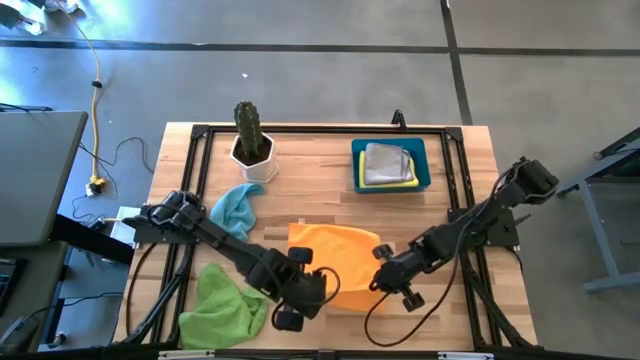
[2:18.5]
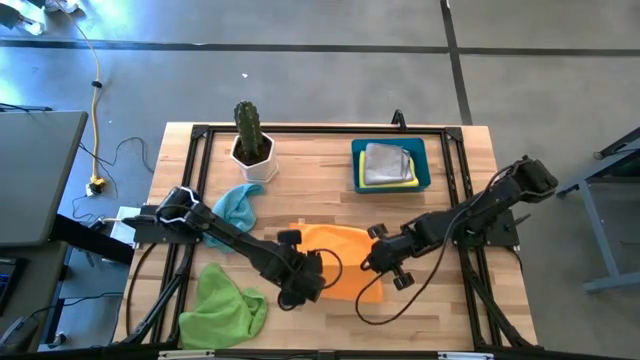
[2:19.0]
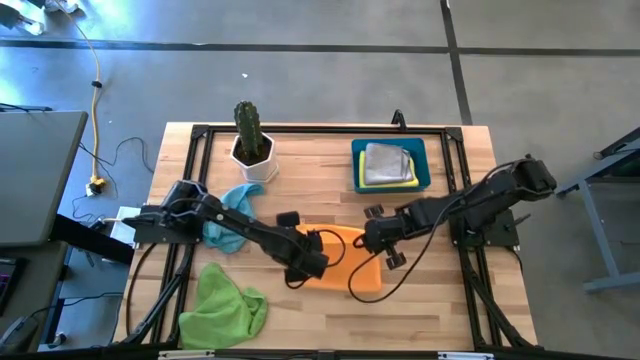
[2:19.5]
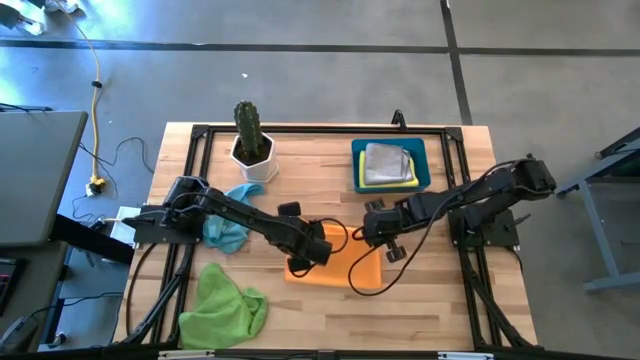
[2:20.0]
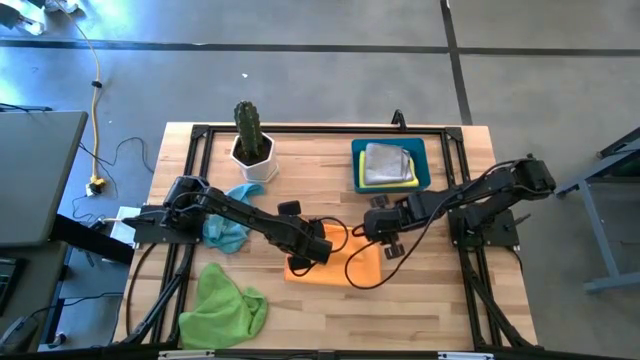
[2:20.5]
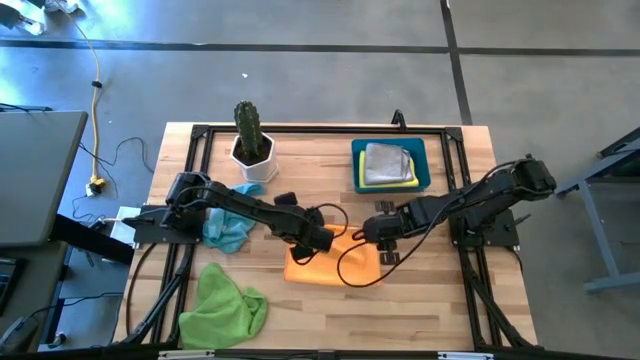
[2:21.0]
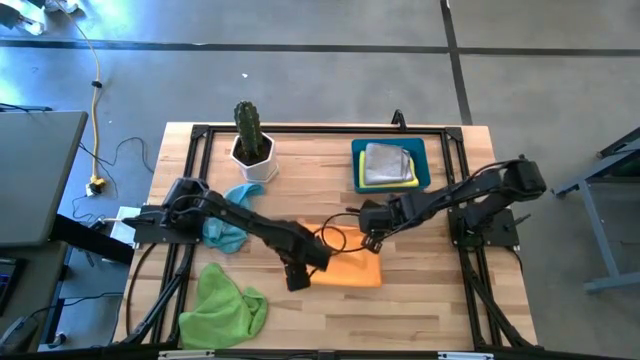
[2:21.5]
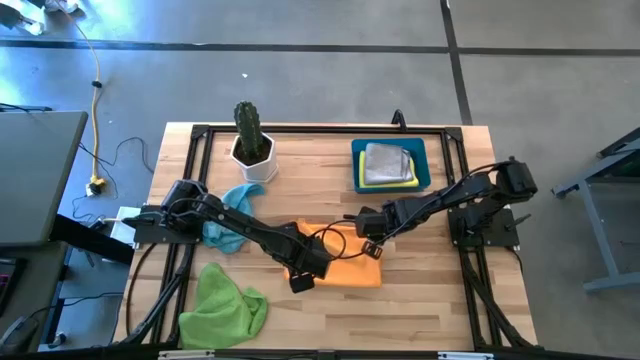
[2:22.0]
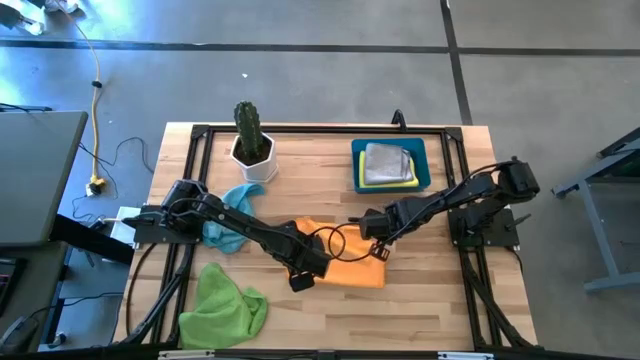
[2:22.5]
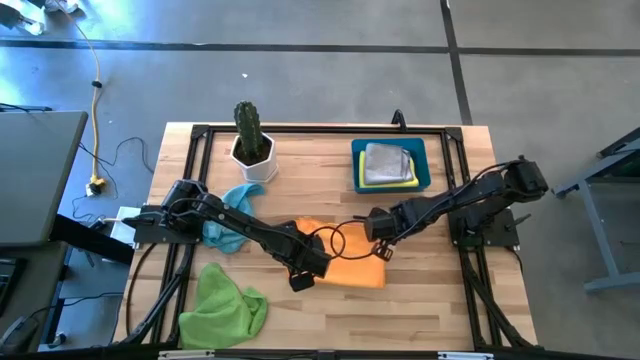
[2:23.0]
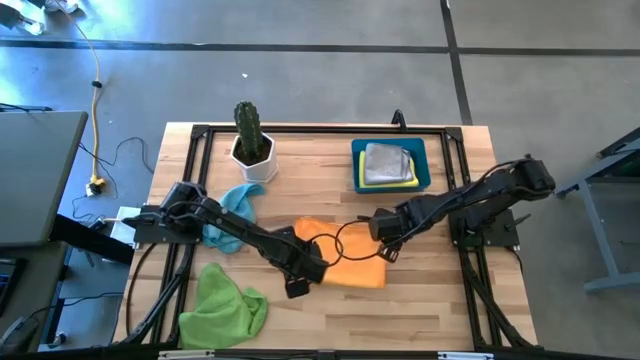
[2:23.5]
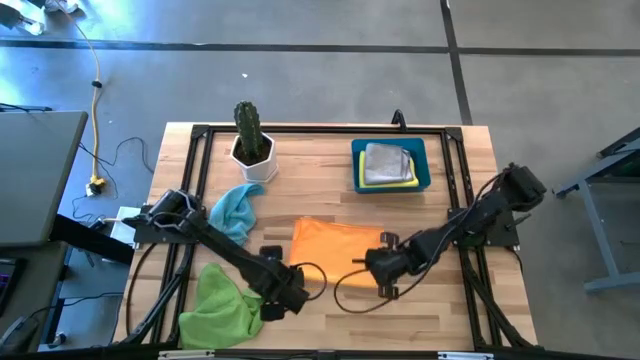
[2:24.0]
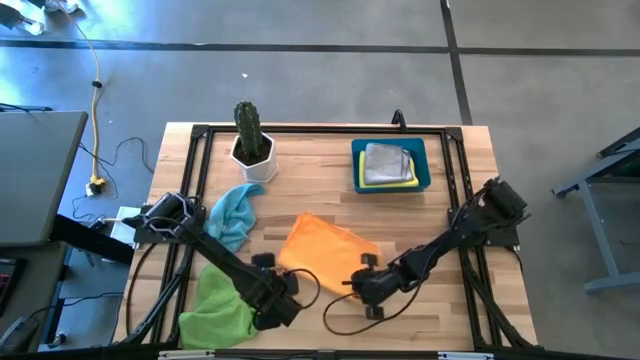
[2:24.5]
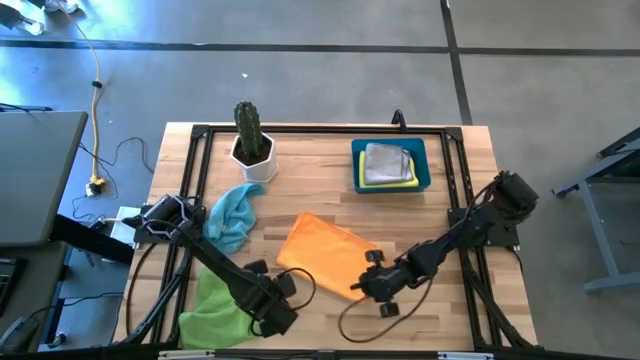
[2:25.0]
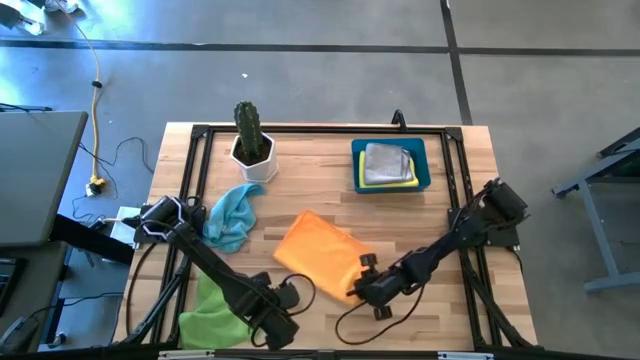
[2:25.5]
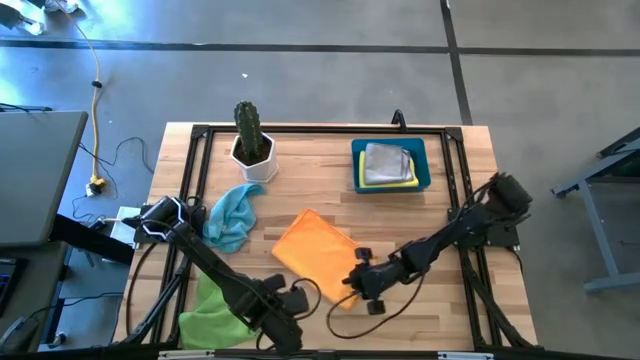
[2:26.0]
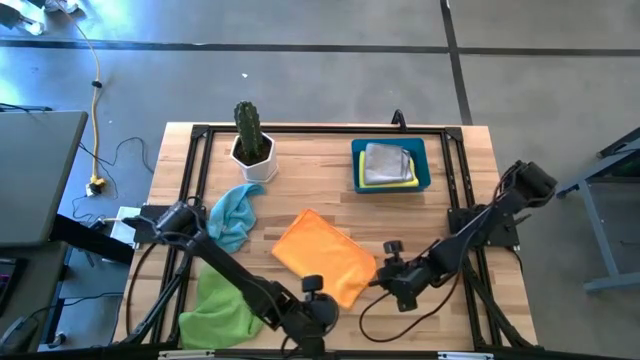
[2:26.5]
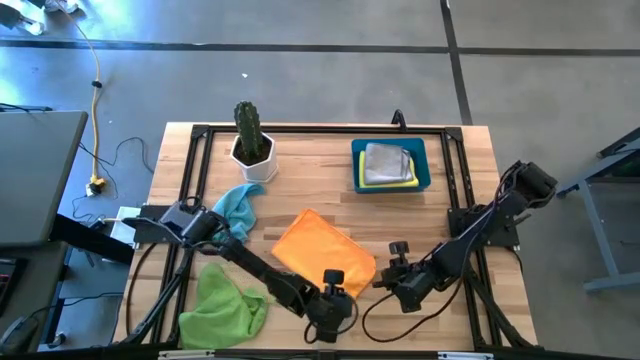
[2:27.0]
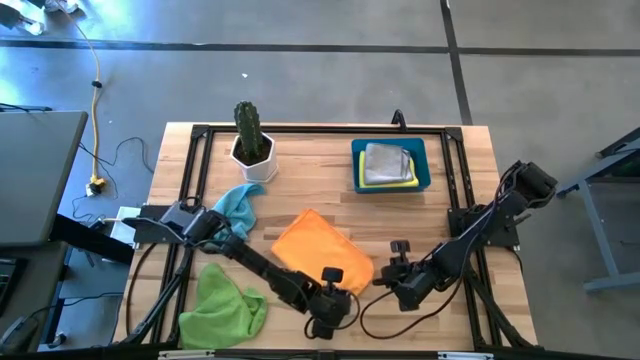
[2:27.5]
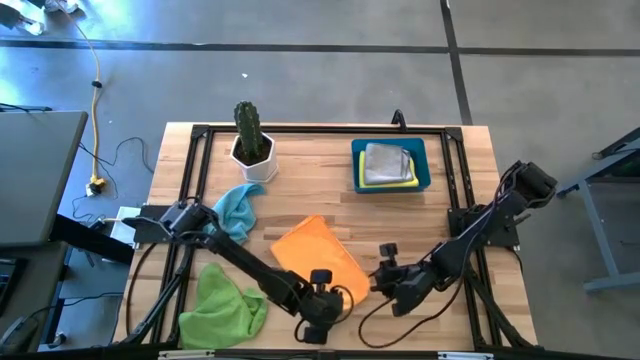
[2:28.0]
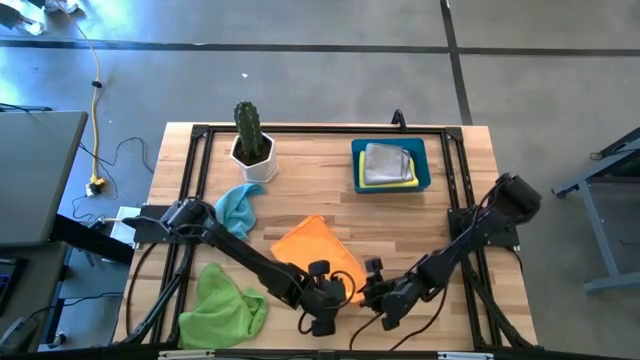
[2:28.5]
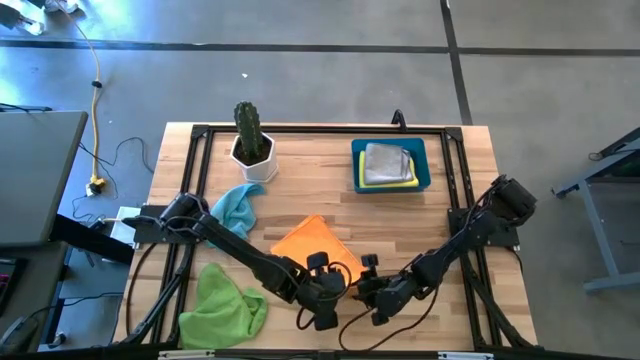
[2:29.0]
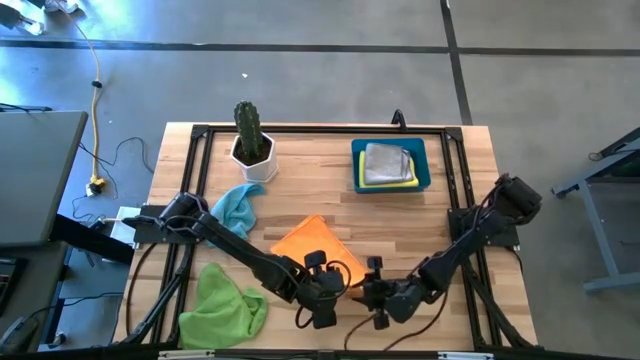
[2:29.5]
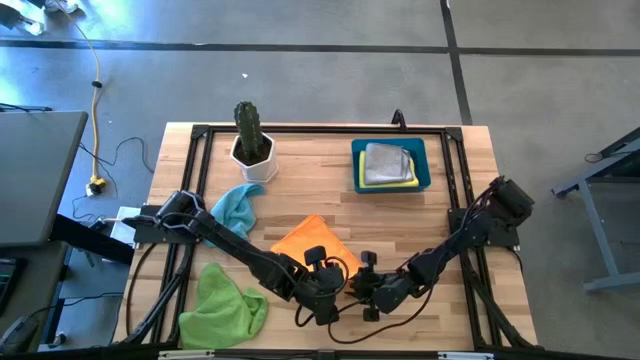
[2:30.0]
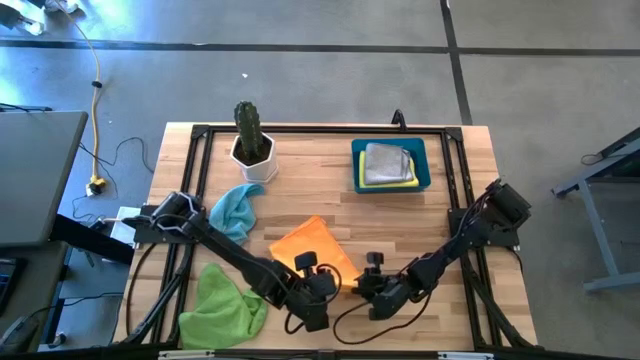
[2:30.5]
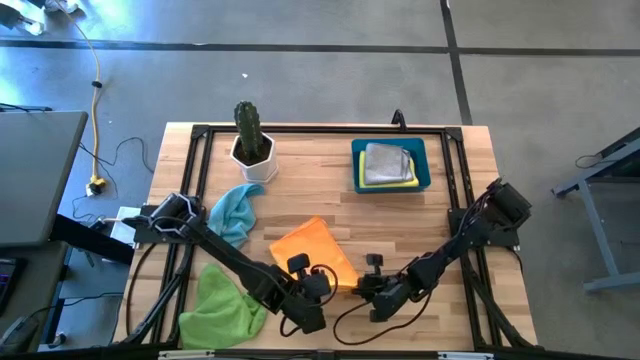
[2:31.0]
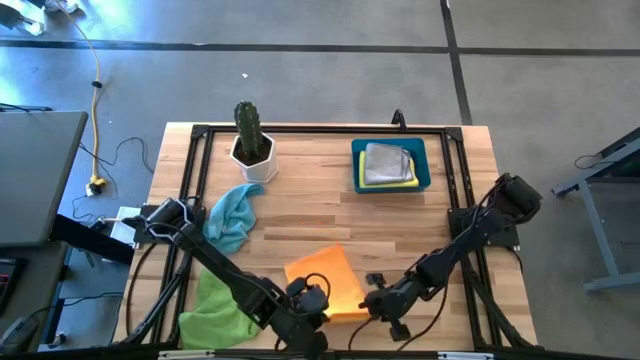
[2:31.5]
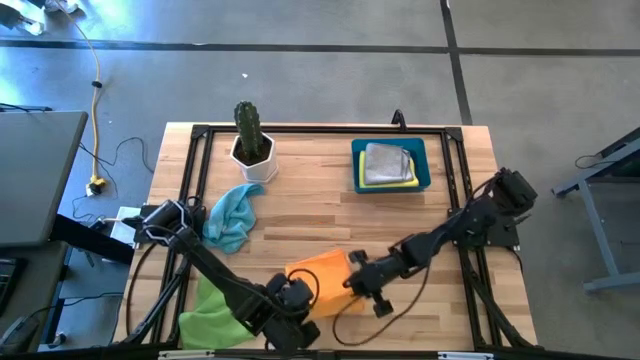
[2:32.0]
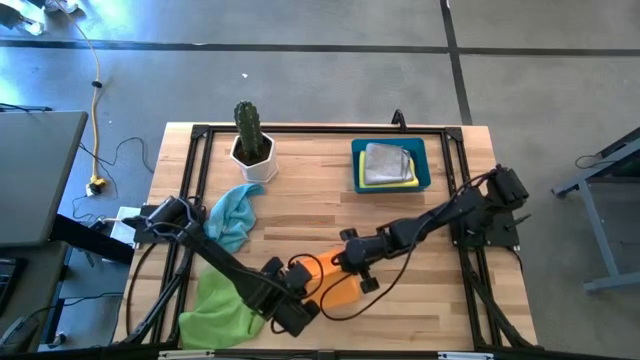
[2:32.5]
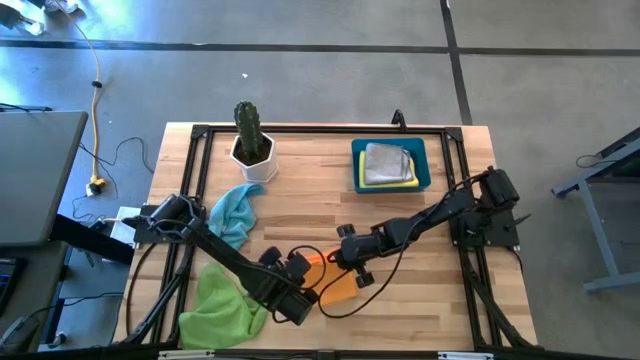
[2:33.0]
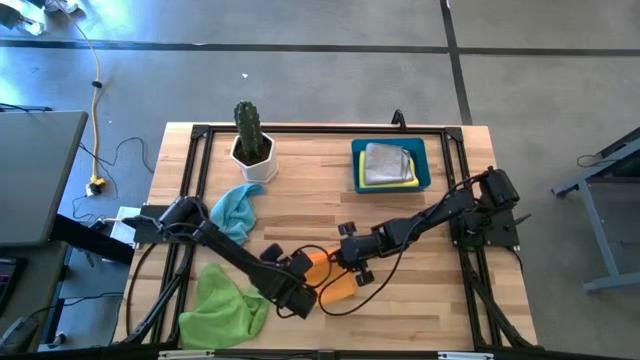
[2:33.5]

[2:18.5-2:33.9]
Task: Fold microfiber towels
Fold the orange microfiber cloth

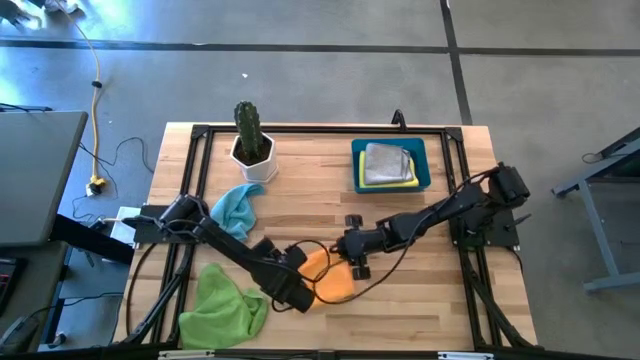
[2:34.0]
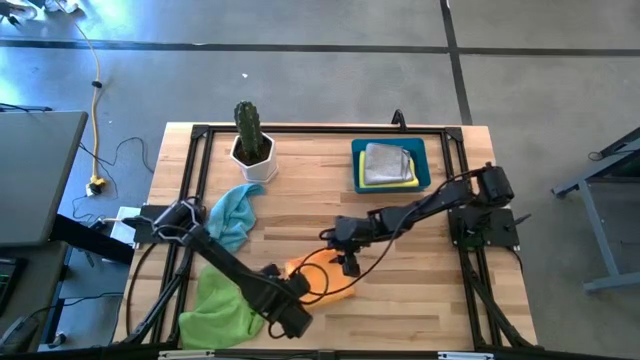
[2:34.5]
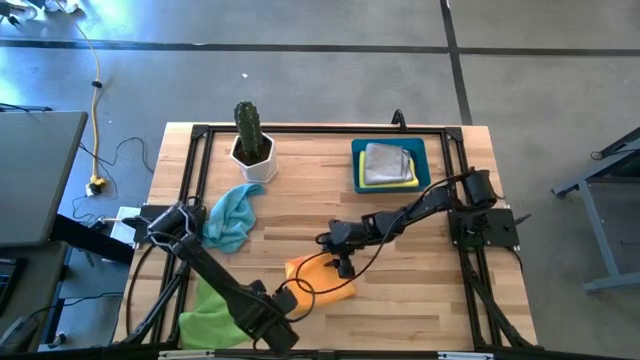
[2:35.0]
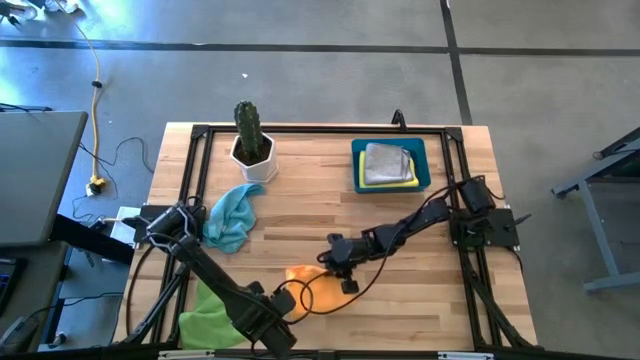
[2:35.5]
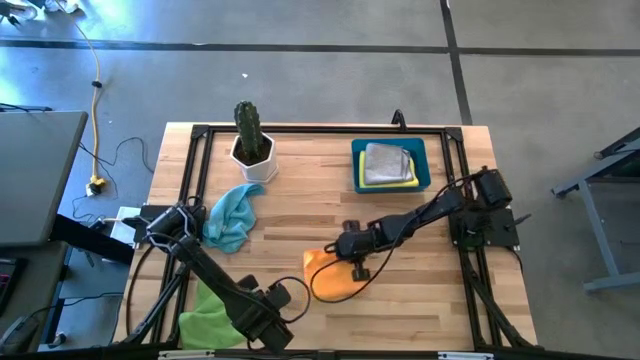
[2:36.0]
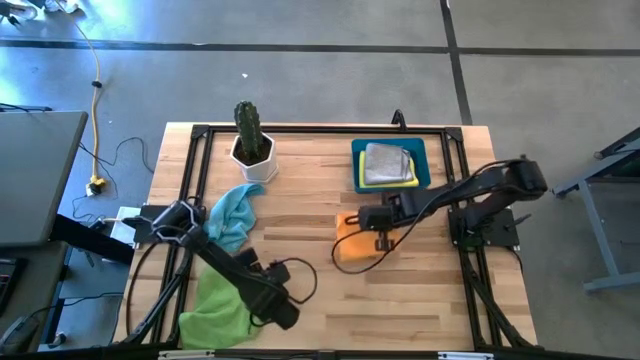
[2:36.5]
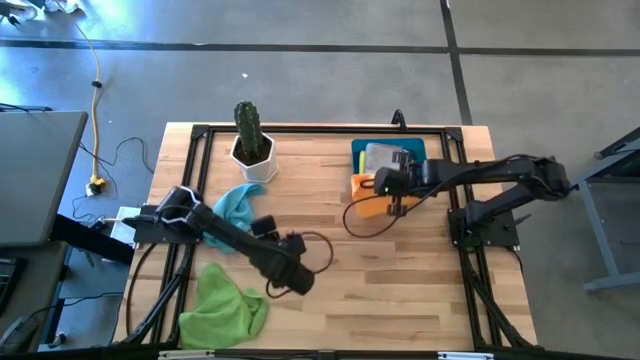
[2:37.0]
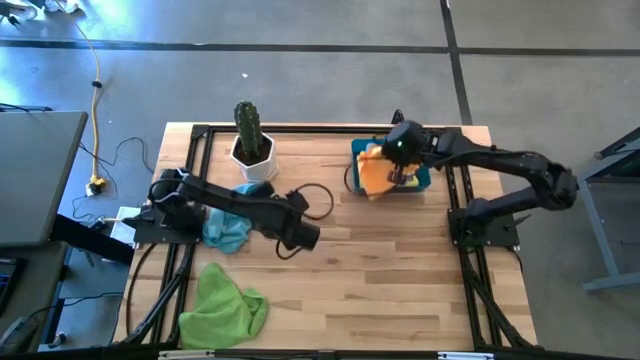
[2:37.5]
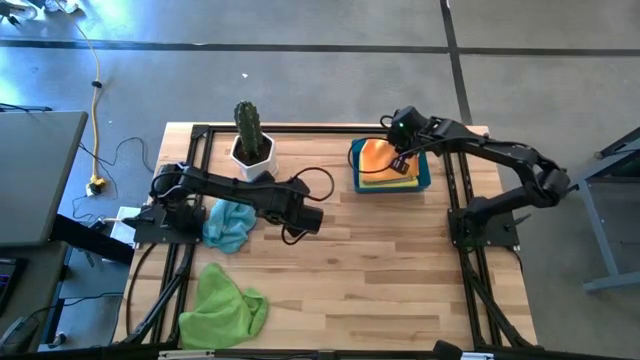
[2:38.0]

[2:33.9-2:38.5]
Put the folded orange microfiber cloth into the blue bin

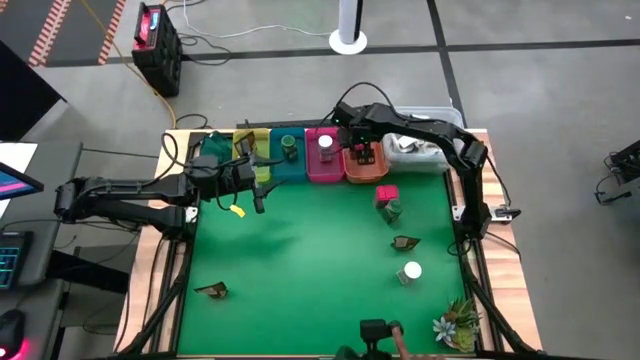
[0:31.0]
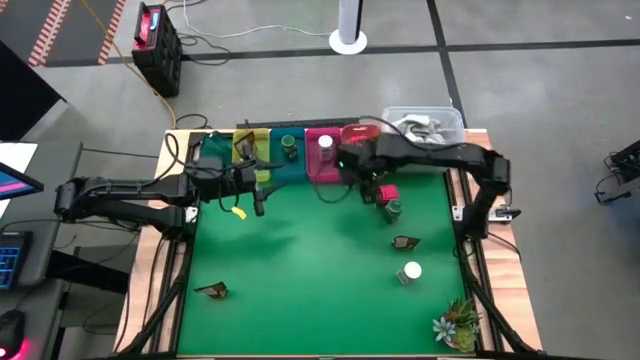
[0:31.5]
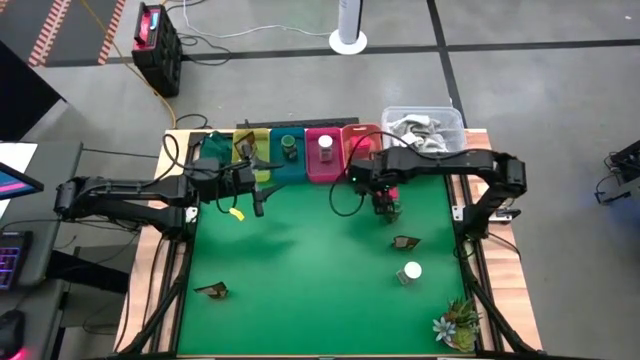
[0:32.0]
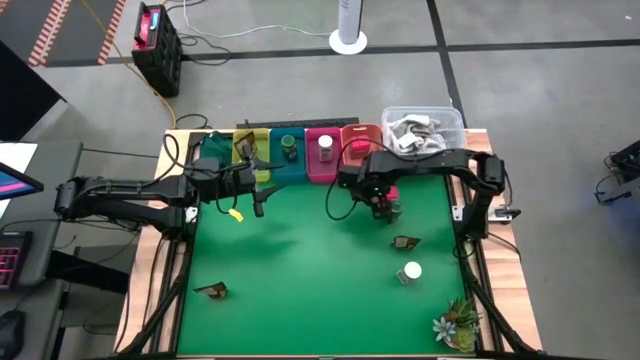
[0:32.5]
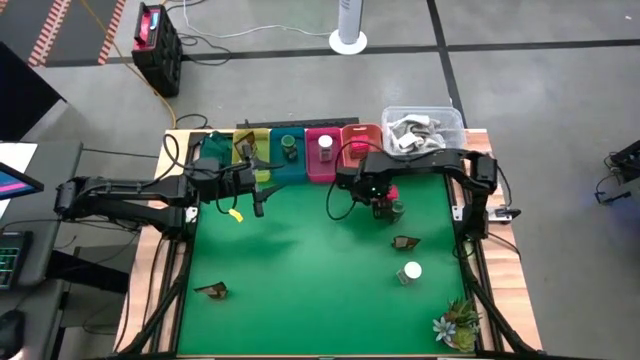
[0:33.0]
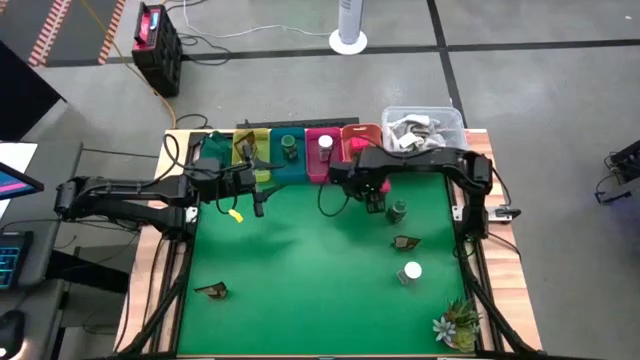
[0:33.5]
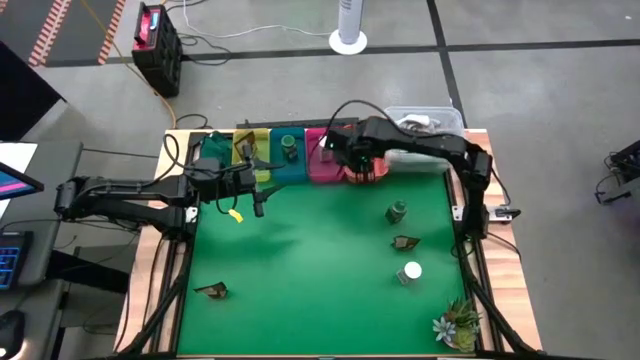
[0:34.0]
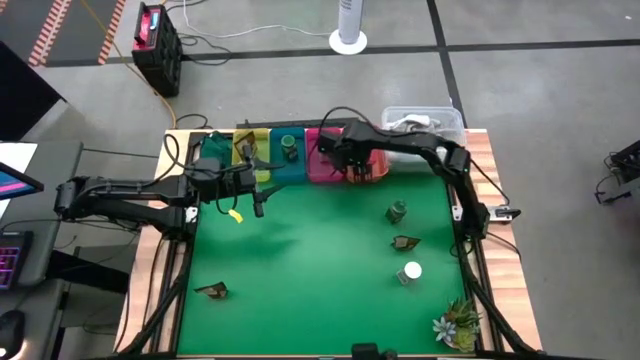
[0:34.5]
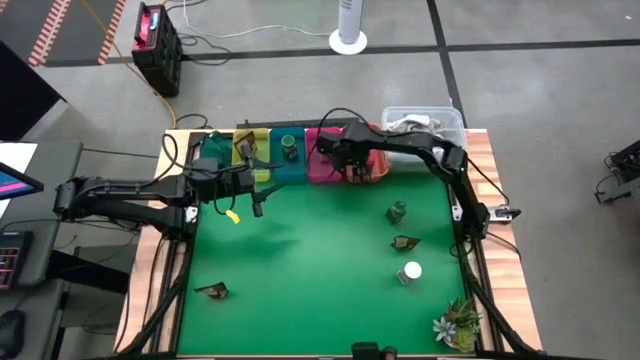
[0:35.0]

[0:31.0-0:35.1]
Task: Sort spices by type
Put the red spice can into the orange bin
